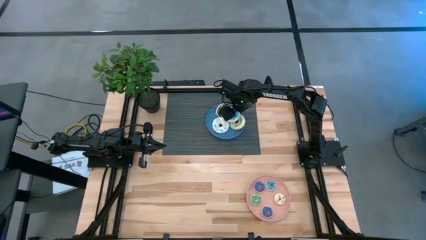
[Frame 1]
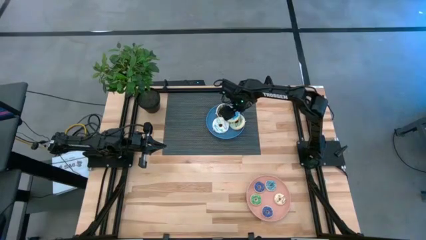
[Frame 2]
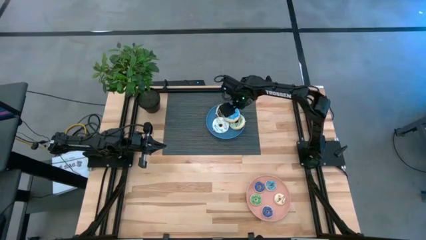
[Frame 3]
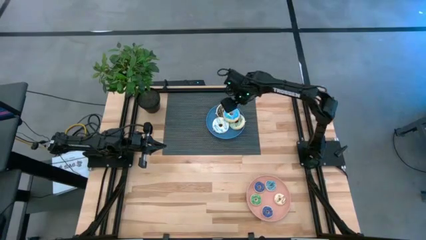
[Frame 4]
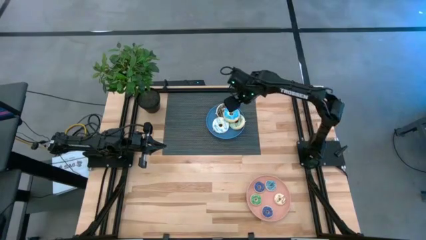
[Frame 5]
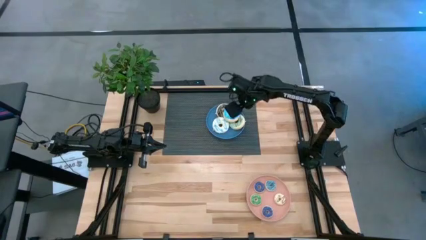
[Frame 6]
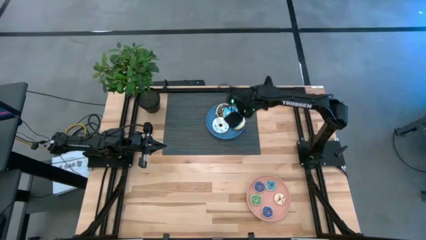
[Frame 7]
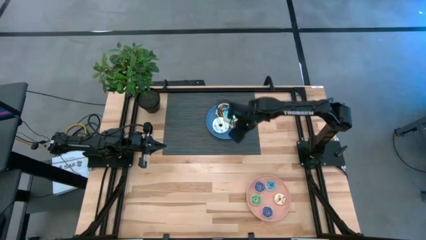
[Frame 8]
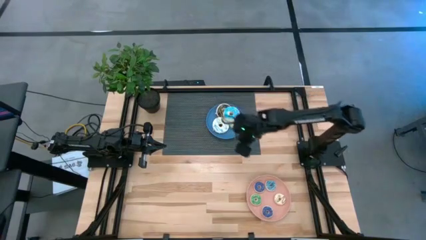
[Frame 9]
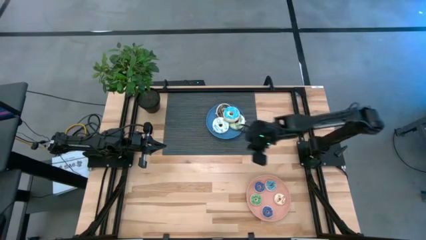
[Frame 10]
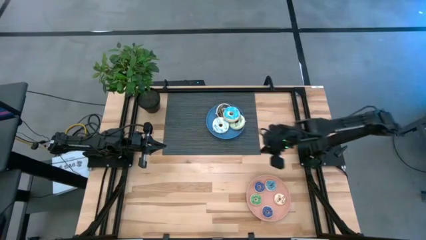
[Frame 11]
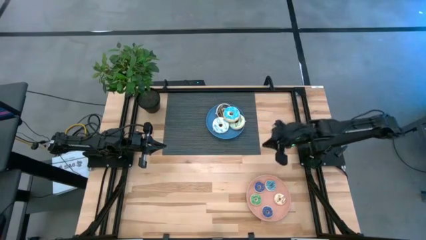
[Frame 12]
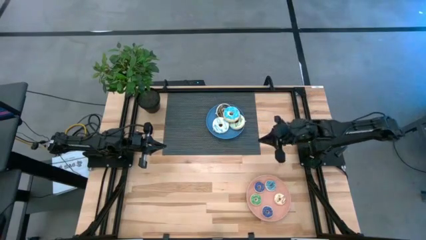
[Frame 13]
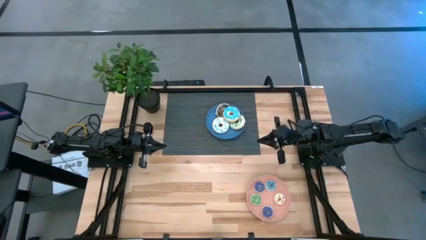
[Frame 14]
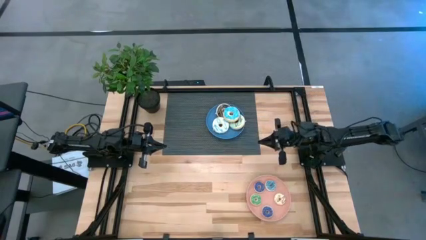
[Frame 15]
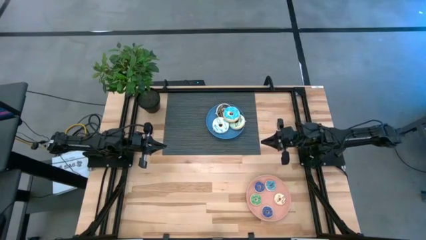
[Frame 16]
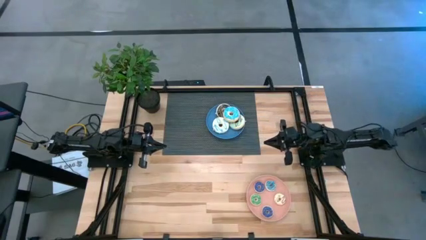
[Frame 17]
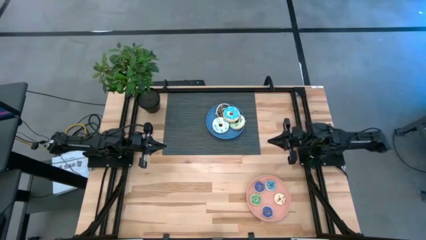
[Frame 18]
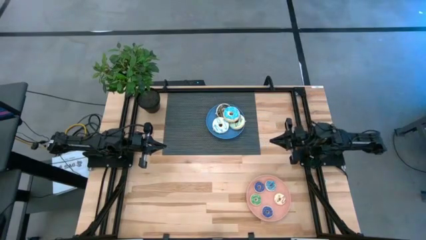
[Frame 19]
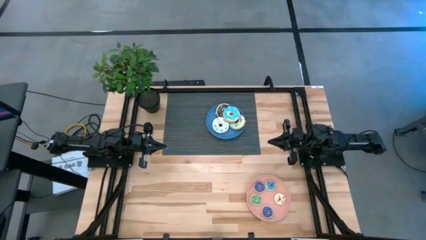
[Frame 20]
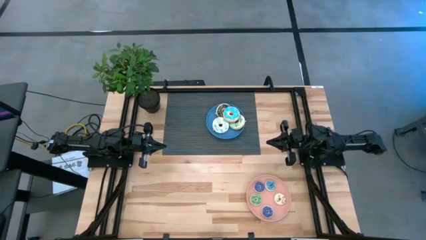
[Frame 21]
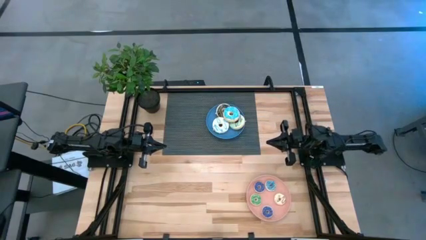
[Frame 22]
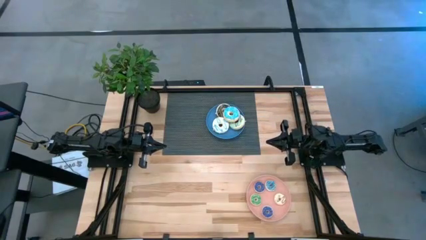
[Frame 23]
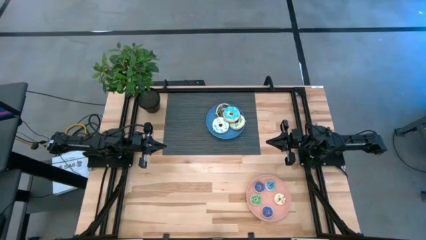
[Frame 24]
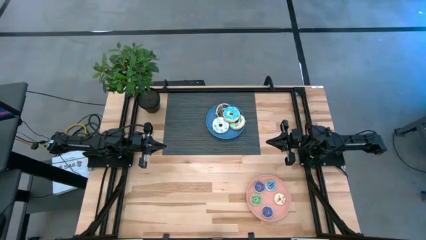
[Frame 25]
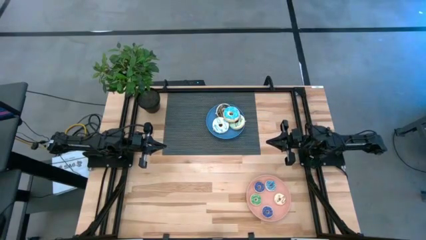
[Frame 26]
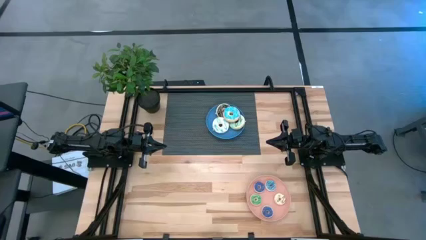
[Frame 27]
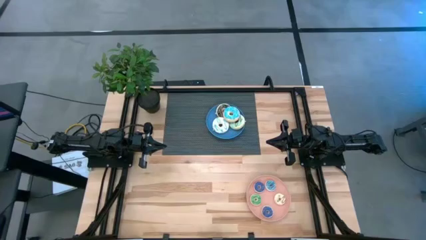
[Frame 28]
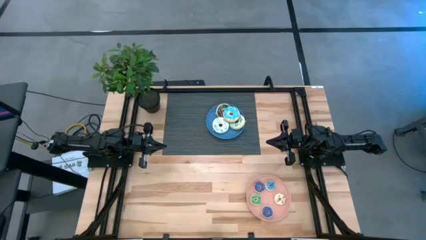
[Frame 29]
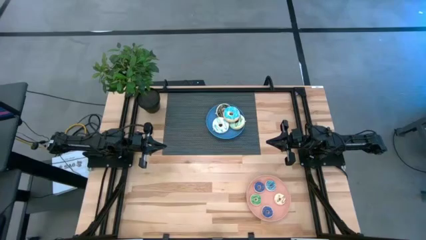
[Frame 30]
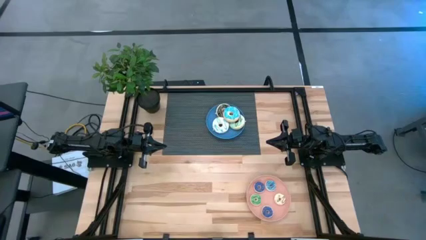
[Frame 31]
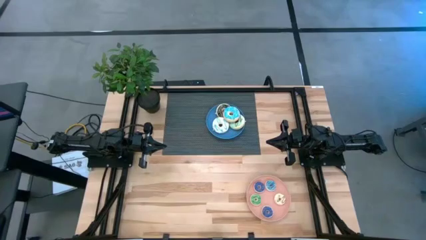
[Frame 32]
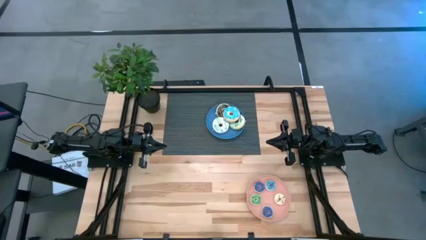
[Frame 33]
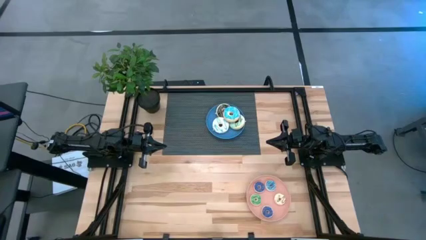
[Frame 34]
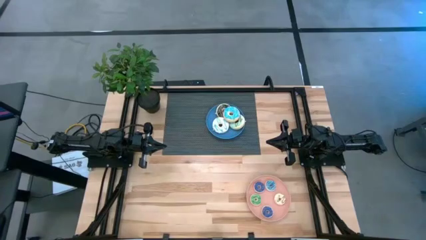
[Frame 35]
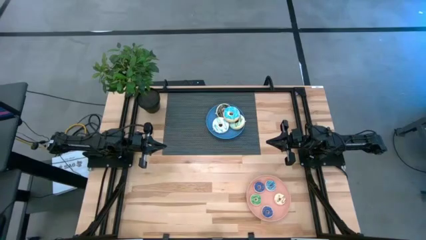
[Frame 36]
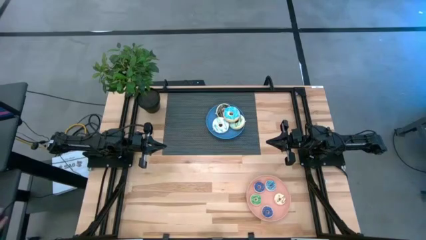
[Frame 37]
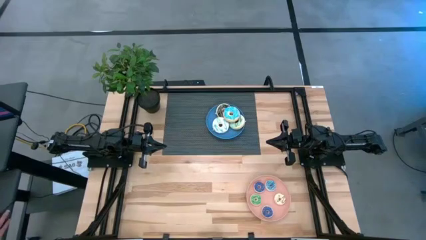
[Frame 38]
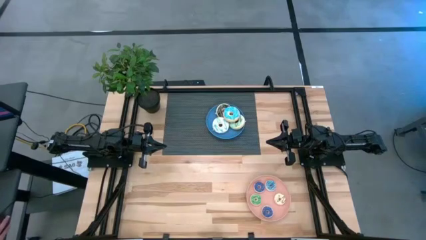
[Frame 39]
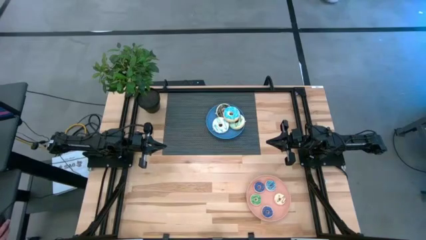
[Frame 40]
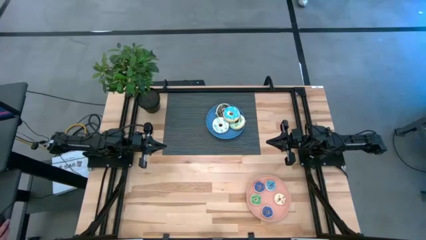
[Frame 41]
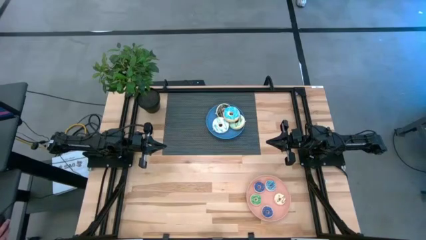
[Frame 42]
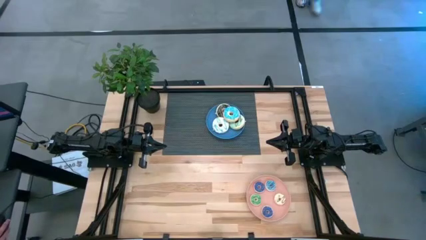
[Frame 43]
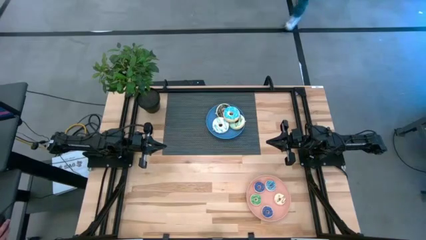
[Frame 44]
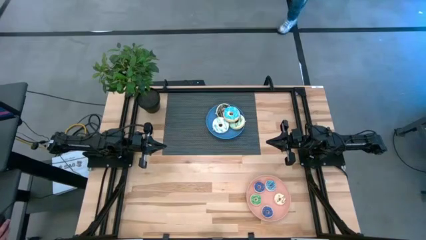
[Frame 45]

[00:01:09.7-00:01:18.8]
Task: Pick & Place donuts
Return to Home Position

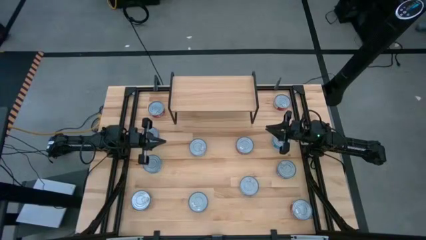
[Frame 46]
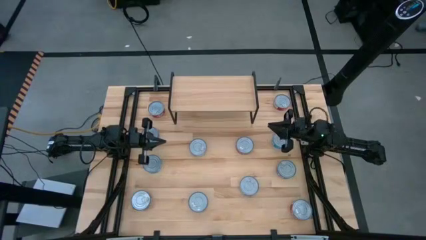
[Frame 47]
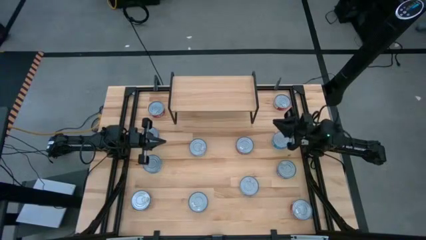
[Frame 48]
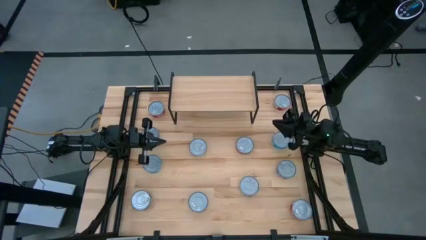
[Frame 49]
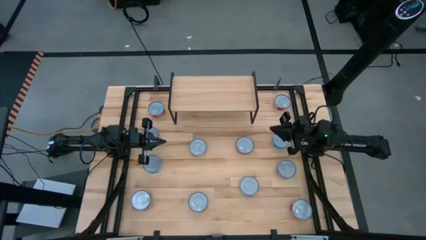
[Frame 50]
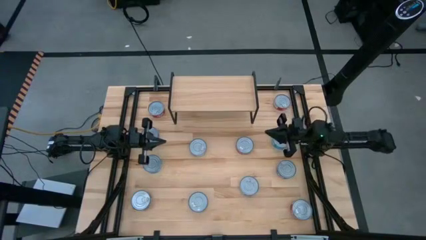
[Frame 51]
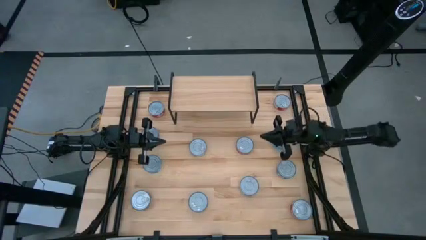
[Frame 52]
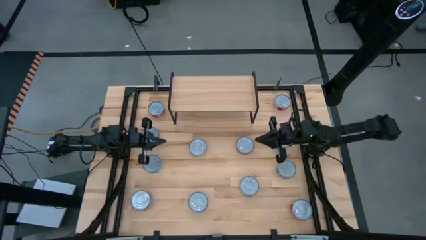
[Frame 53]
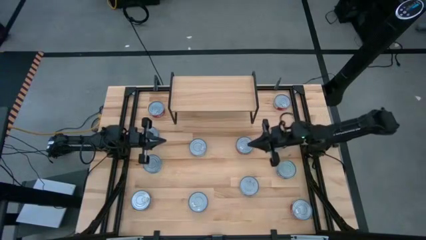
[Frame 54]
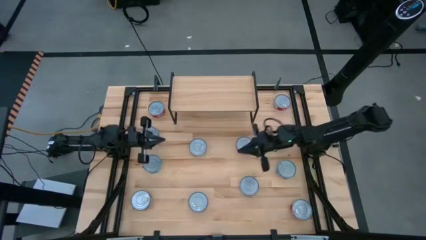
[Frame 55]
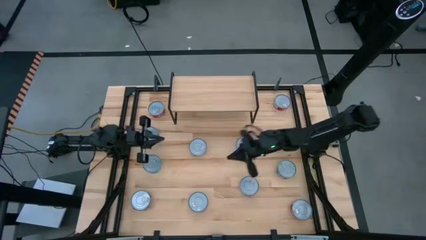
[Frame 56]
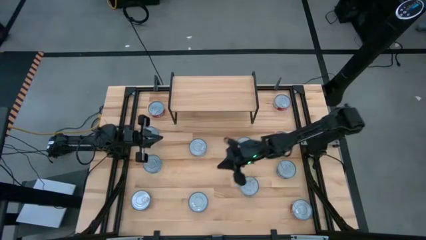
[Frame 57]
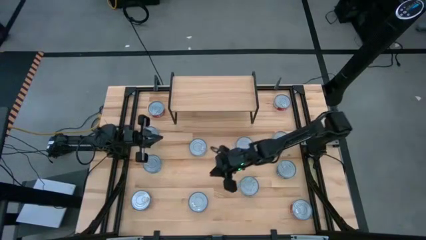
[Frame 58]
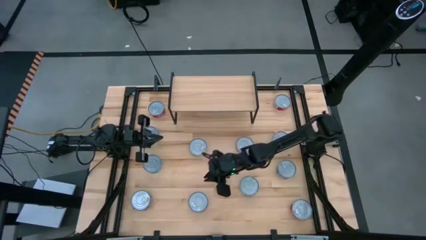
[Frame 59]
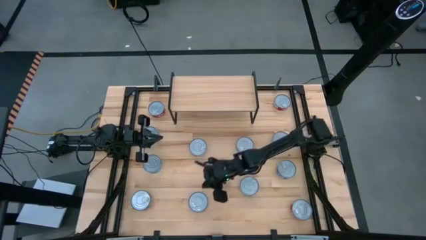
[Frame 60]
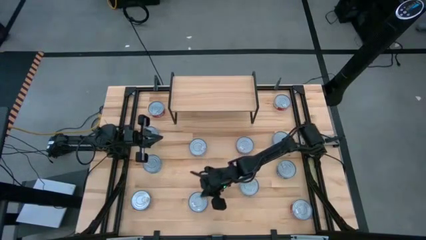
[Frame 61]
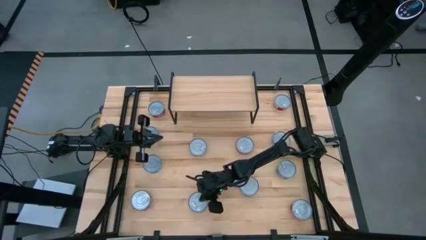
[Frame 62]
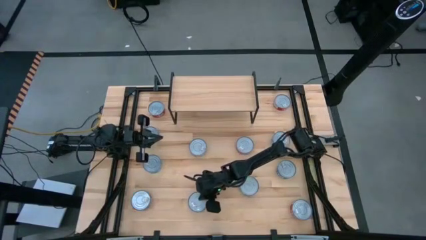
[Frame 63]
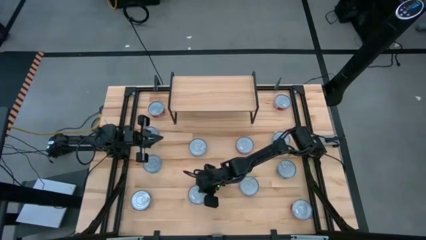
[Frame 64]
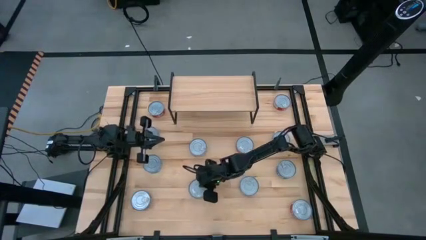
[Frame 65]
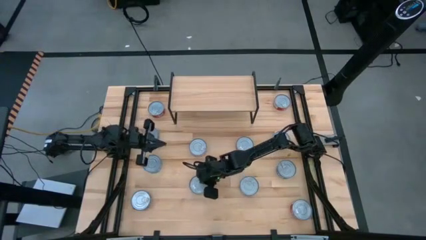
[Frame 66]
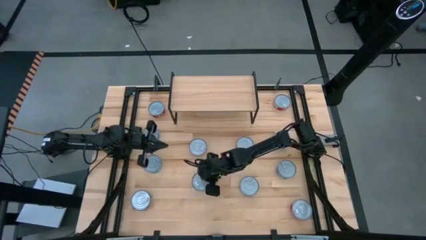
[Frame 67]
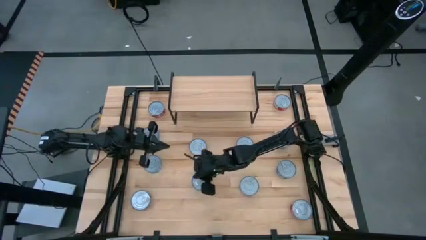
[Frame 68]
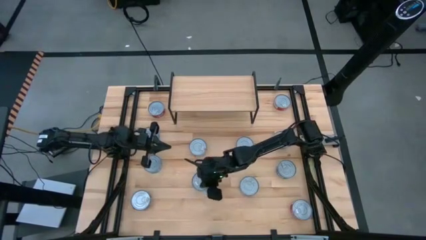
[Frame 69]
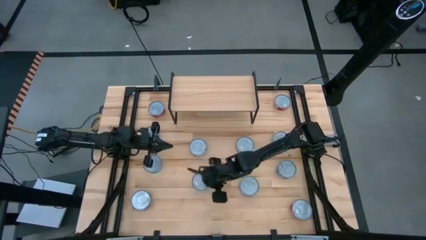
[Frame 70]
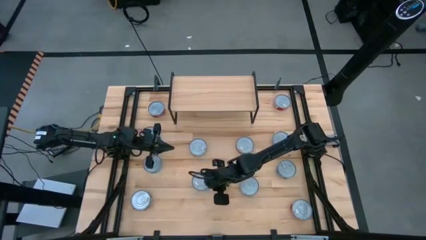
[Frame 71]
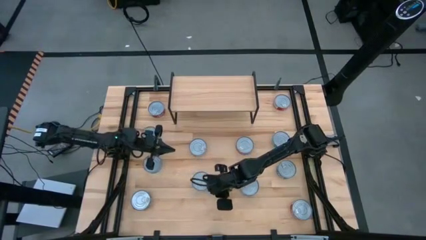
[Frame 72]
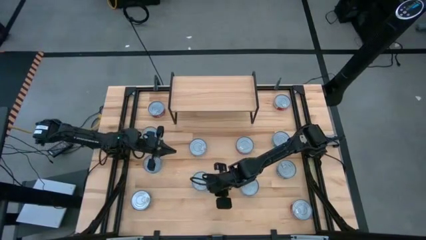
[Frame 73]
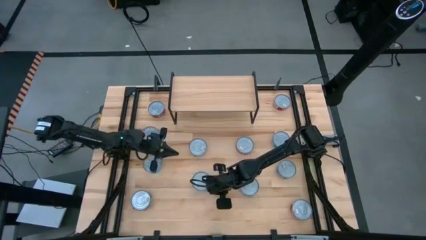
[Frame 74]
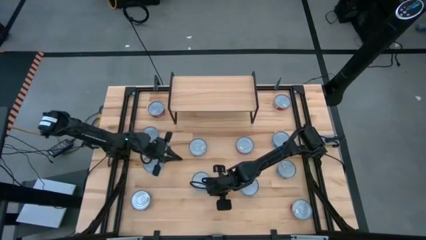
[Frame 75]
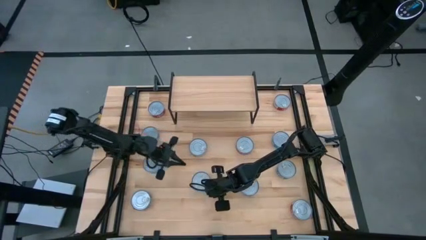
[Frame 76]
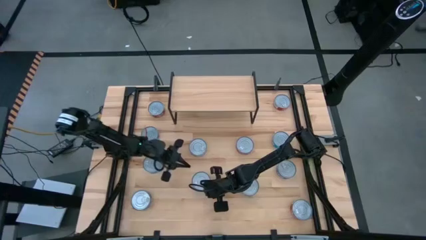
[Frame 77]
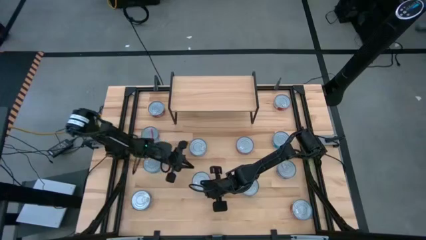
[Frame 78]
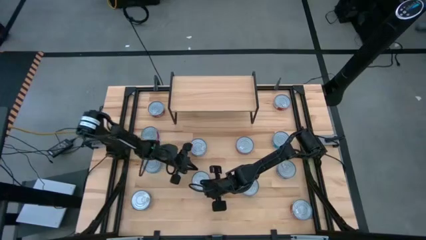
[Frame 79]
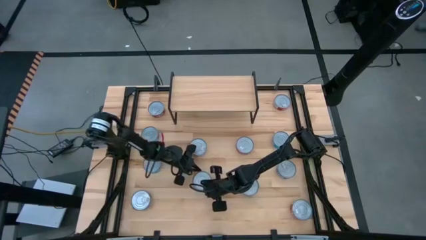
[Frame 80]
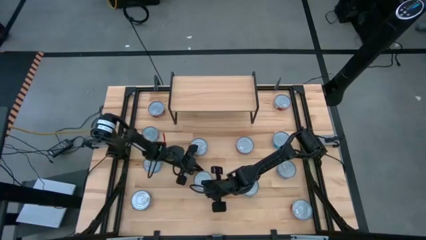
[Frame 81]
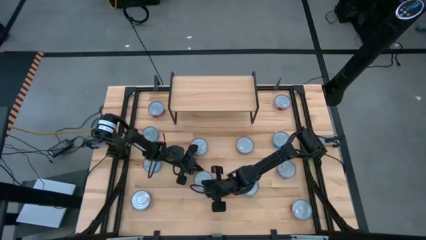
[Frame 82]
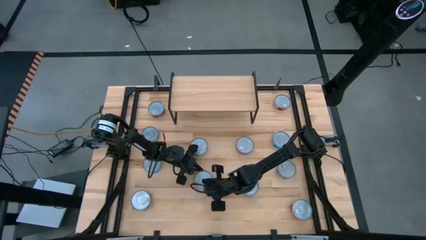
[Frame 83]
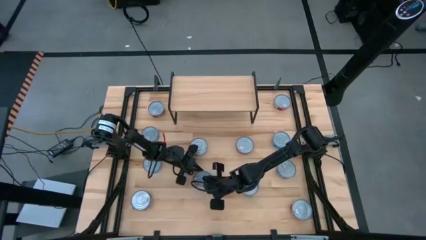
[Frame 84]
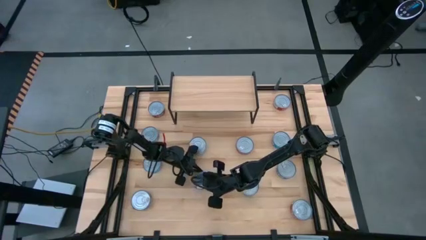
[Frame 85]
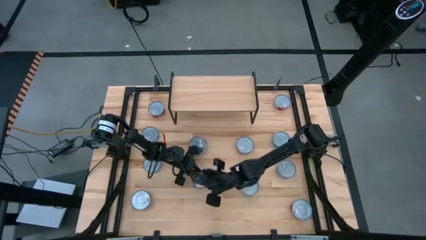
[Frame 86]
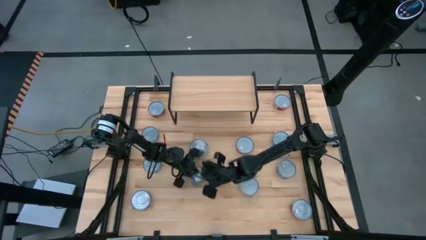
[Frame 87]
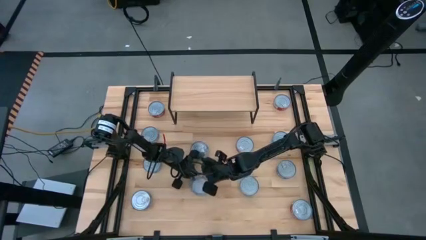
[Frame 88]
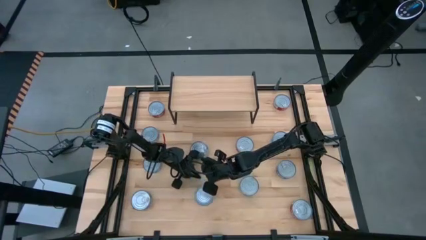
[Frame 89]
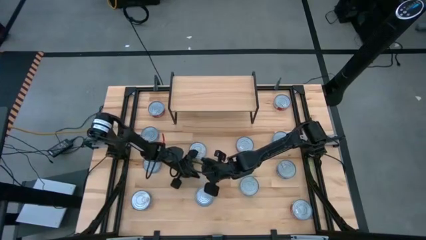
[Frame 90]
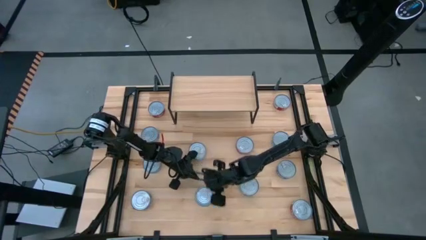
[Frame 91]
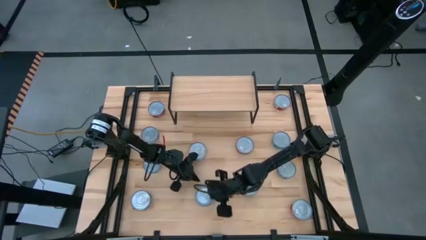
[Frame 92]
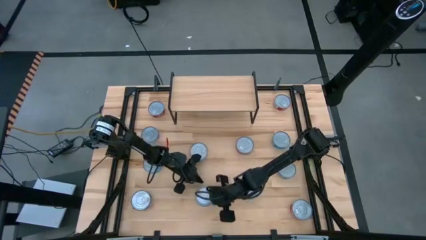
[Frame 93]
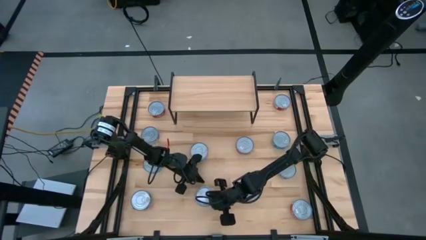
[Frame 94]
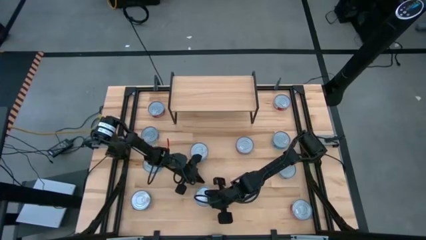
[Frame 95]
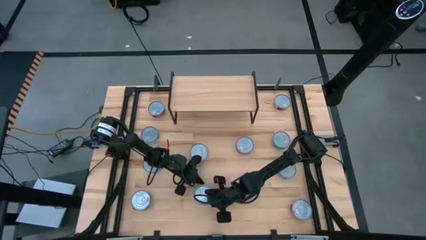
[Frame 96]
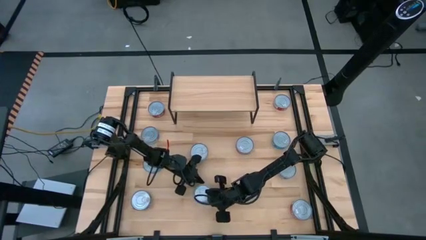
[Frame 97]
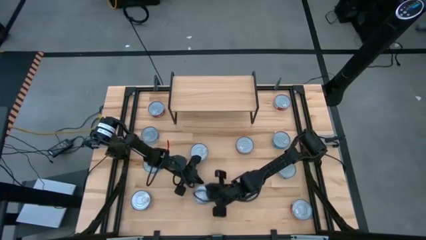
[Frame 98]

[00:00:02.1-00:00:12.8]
Task: Stack canned seafood by type on shelf
Put the blue tuna can on the shelf
